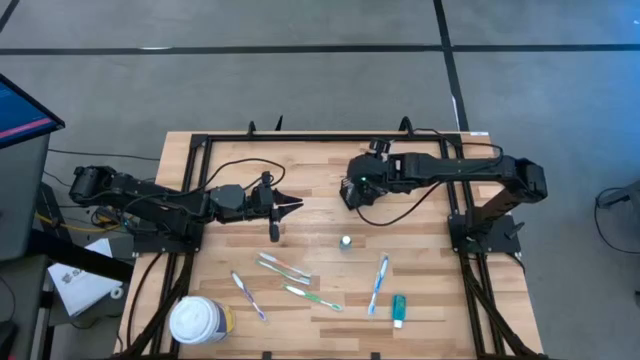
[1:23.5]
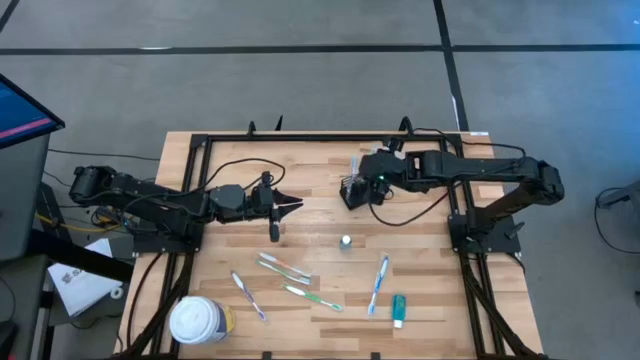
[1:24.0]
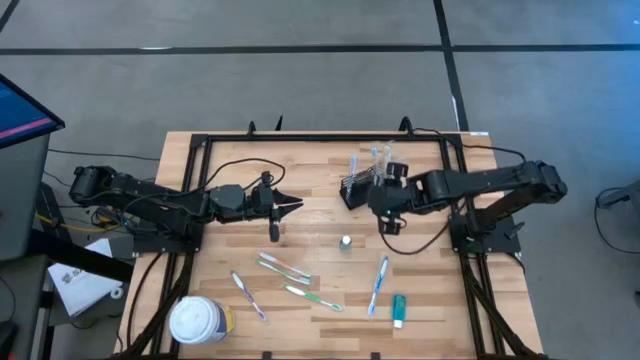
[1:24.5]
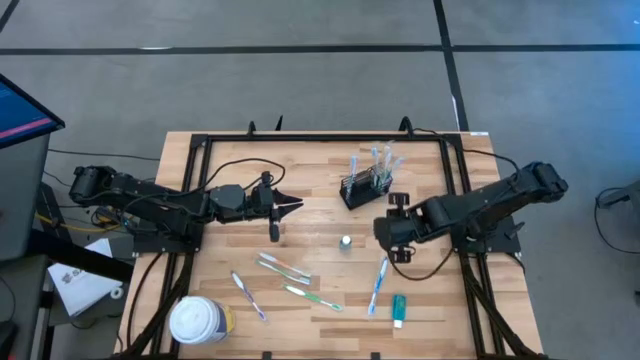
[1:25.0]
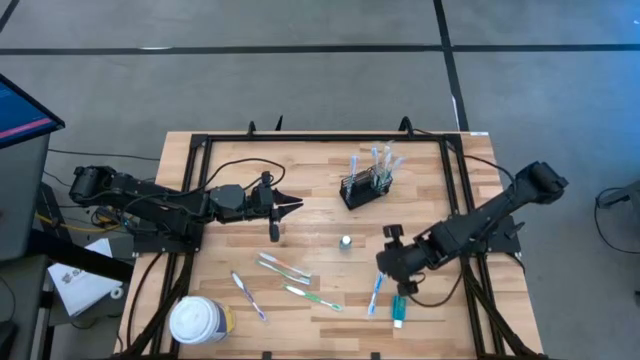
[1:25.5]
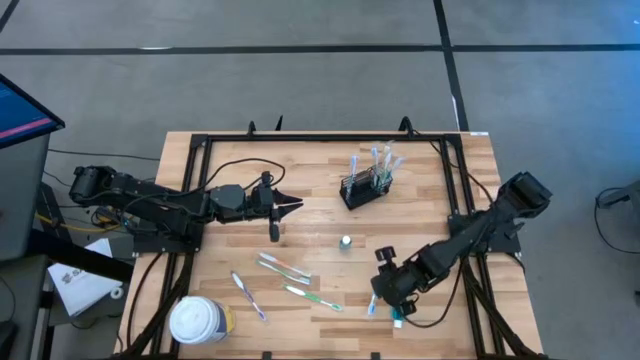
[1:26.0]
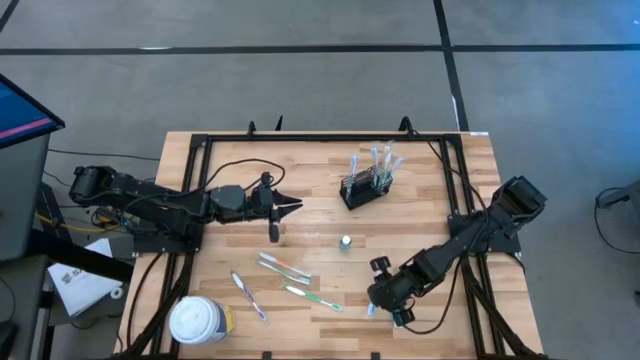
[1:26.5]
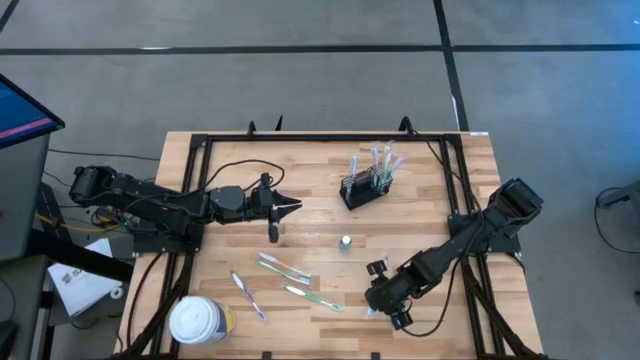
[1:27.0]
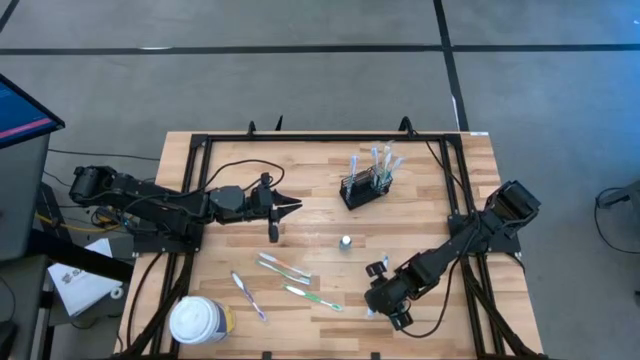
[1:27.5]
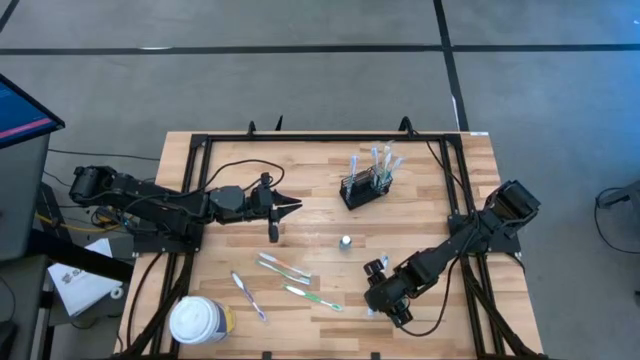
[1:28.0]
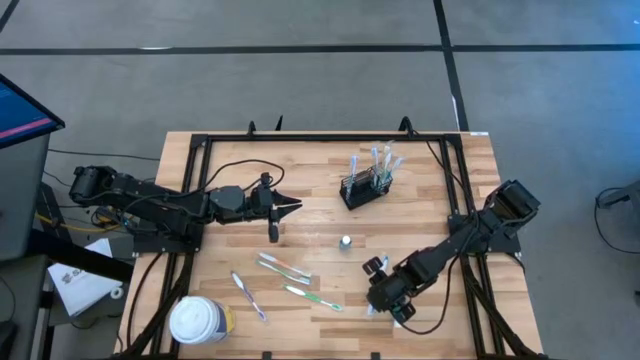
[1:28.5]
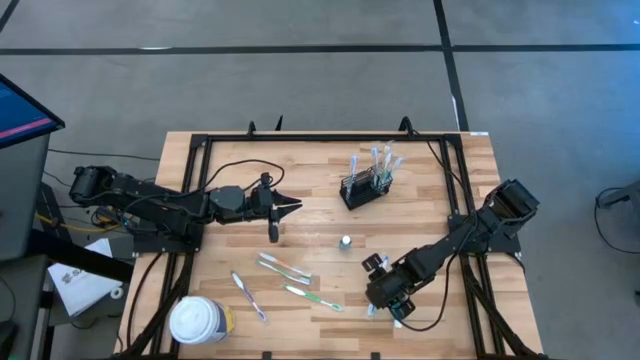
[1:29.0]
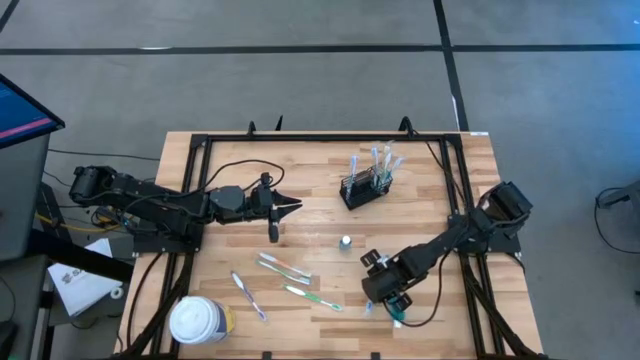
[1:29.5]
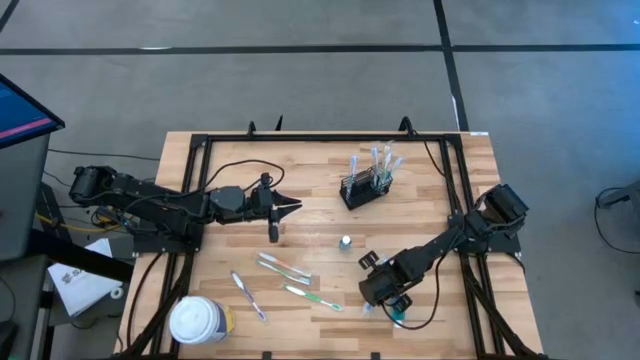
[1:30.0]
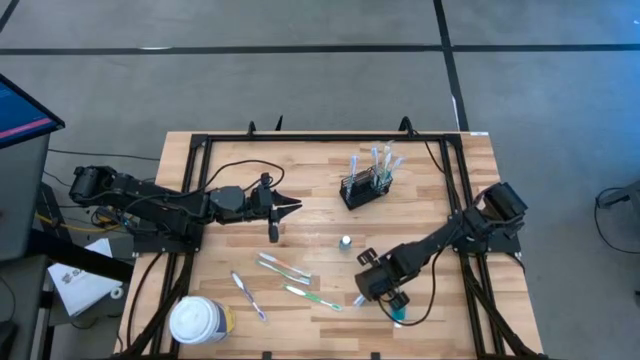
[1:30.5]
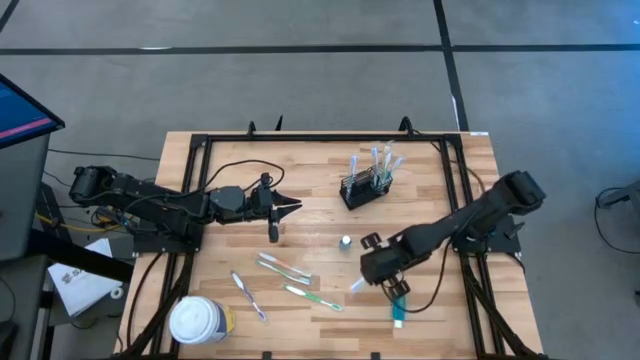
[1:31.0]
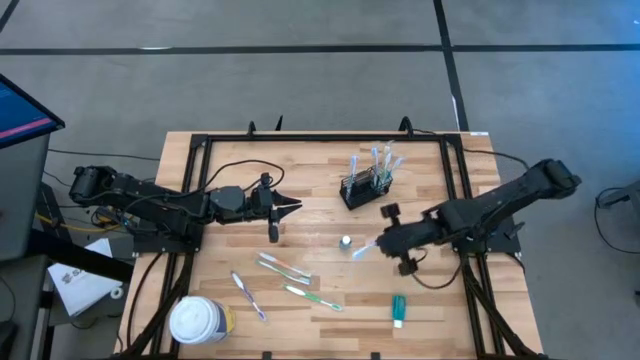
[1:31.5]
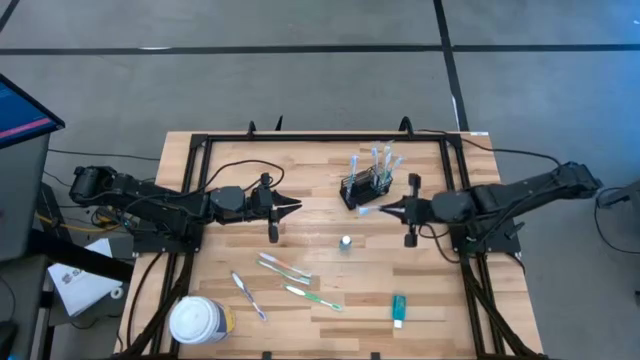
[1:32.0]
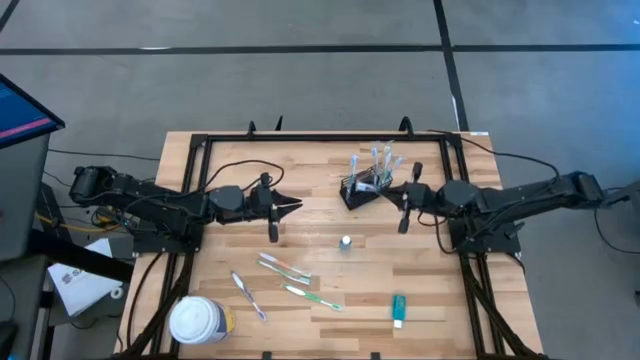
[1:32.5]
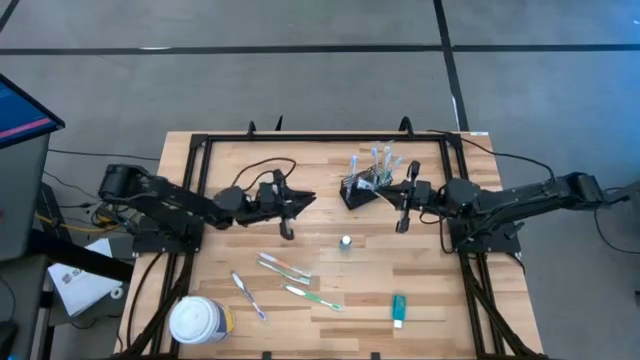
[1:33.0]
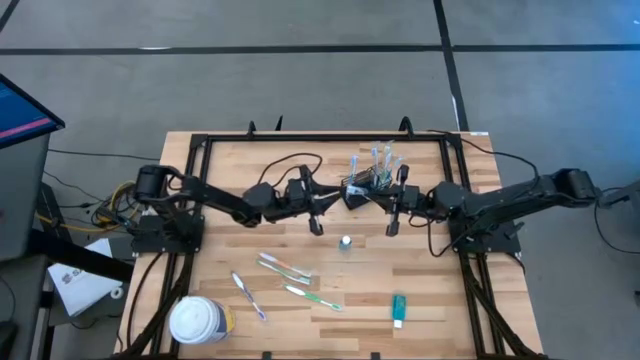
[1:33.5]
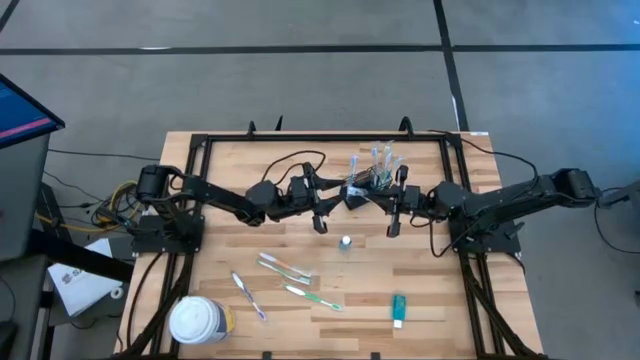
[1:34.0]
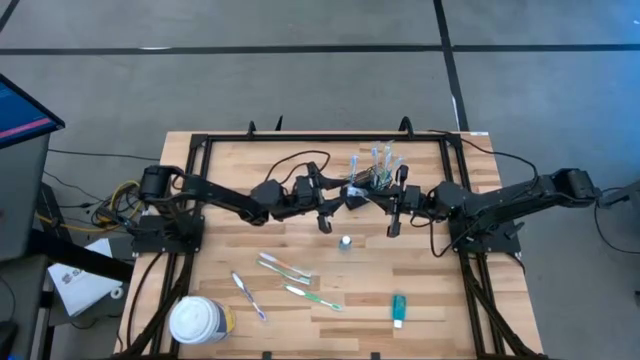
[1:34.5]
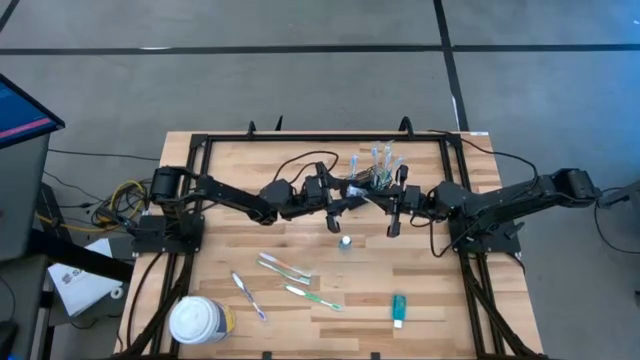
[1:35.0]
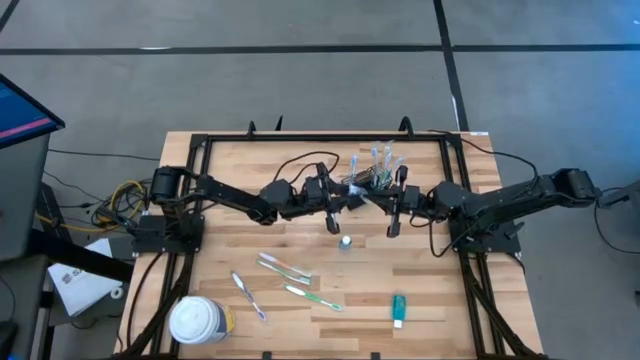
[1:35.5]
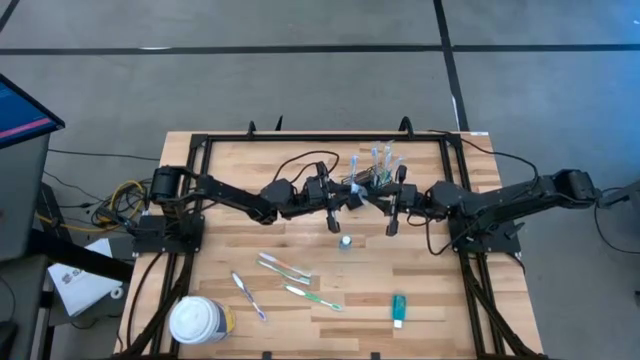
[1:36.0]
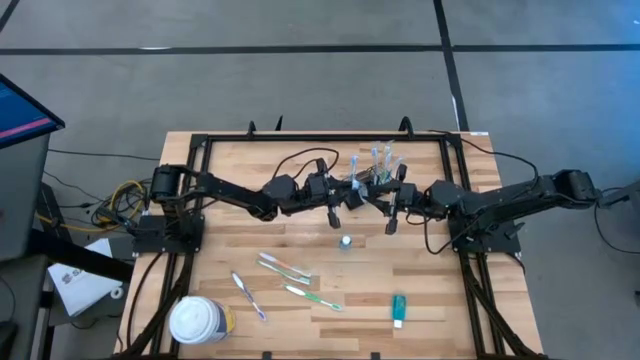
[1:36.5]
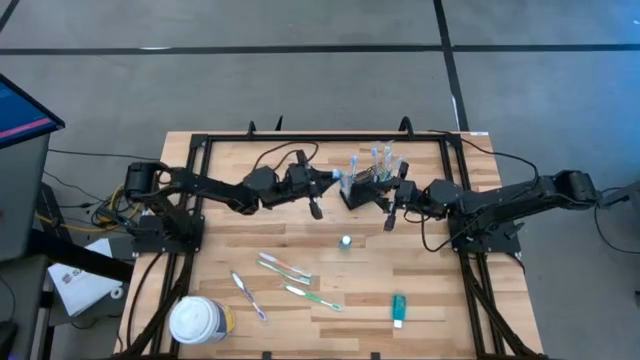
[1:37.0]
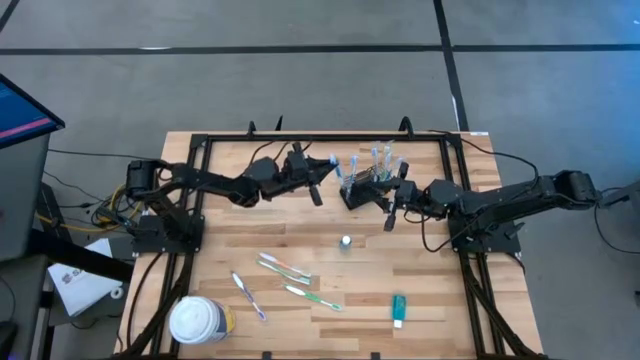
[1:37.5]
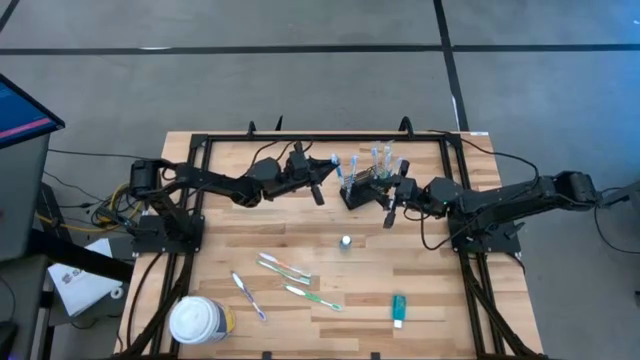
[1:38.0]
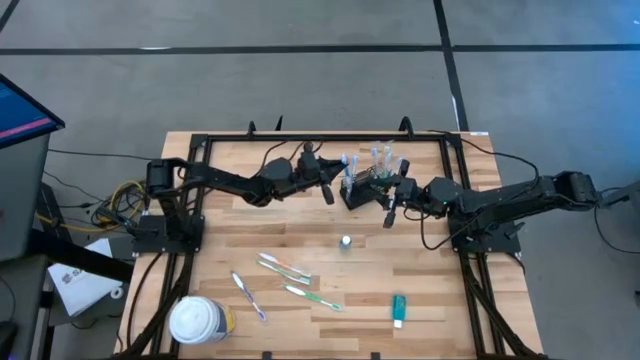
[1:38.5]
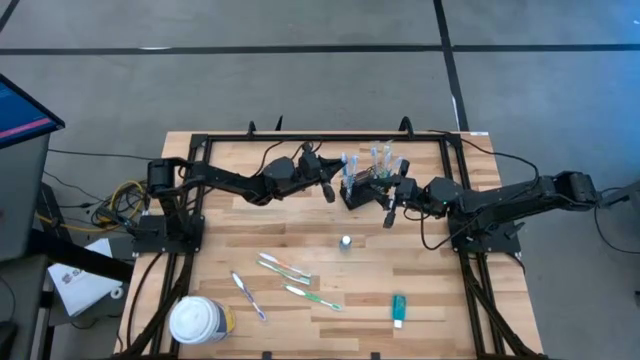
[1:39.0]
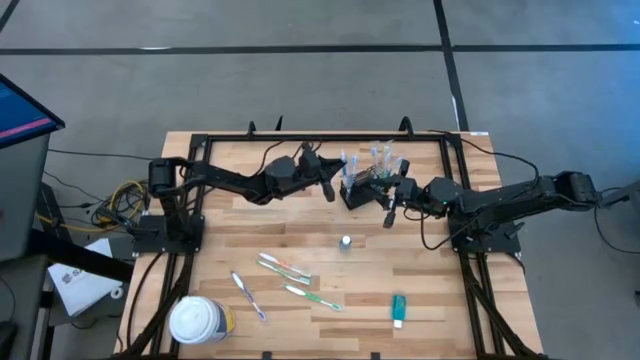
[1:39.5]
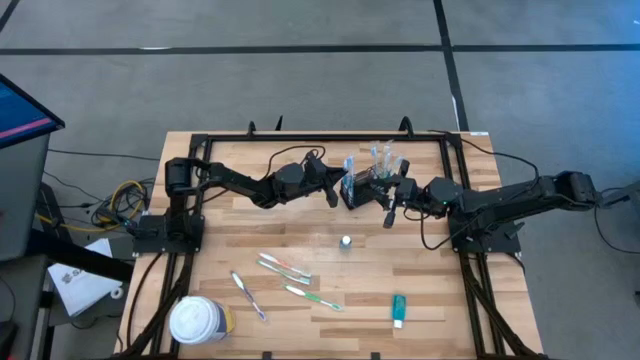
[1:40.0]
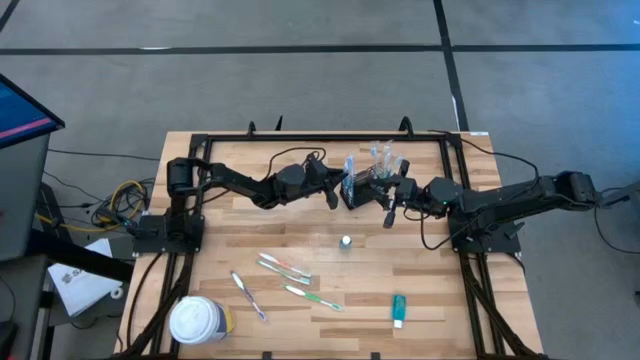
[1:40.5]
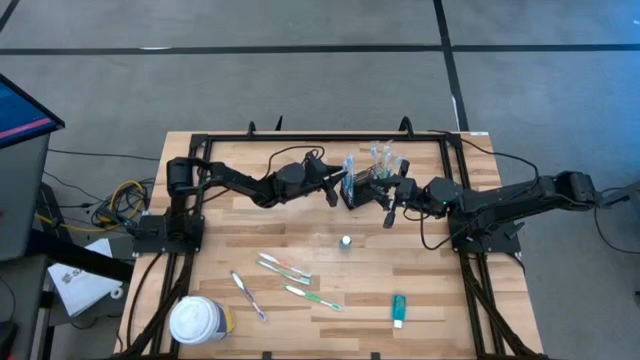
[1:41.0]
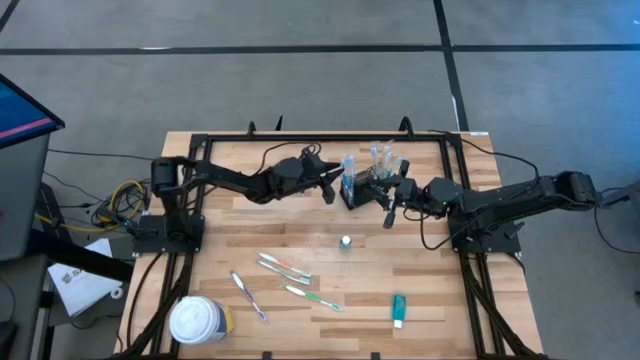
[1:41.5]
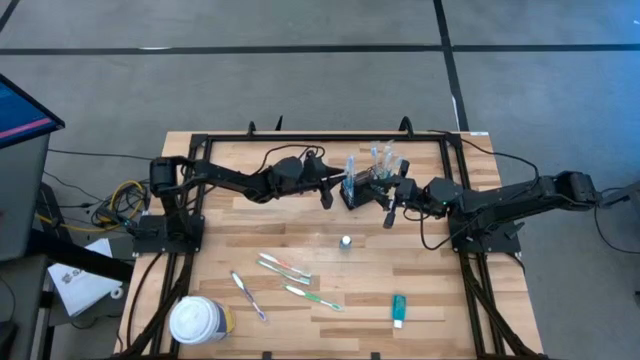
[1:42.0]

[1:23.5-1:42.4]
Task: Pick & Place toothbrushing station
Put the blue toothbrush into the mesh organizer

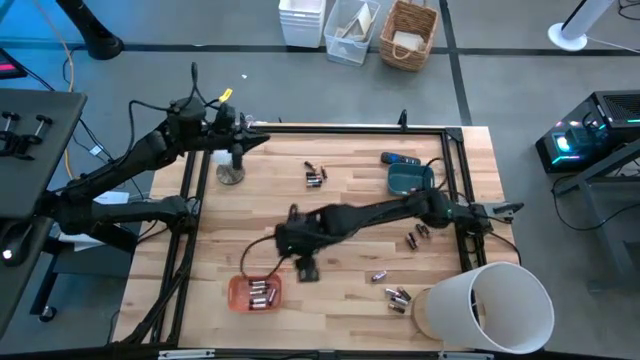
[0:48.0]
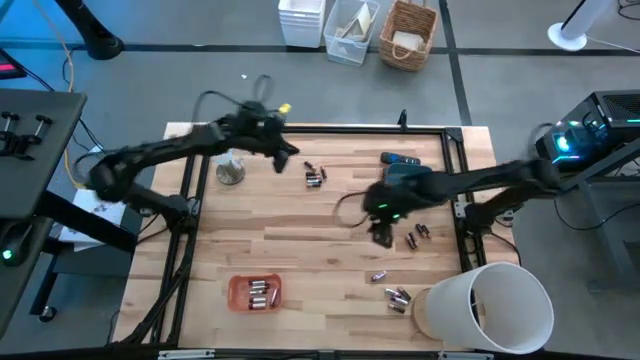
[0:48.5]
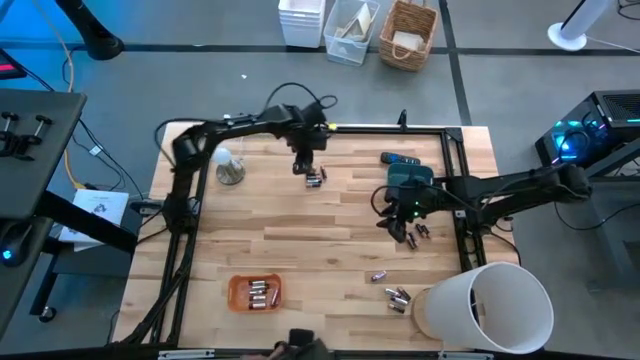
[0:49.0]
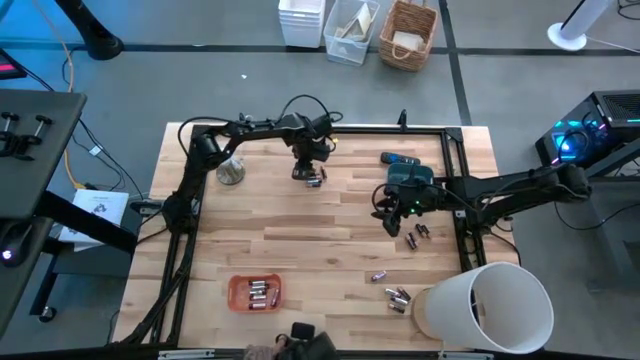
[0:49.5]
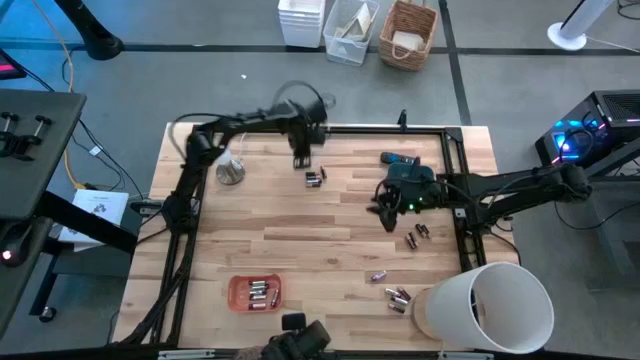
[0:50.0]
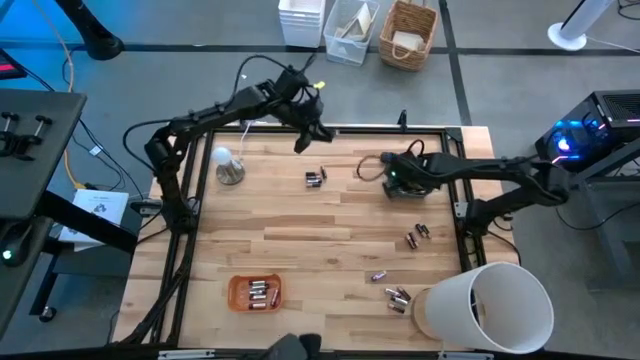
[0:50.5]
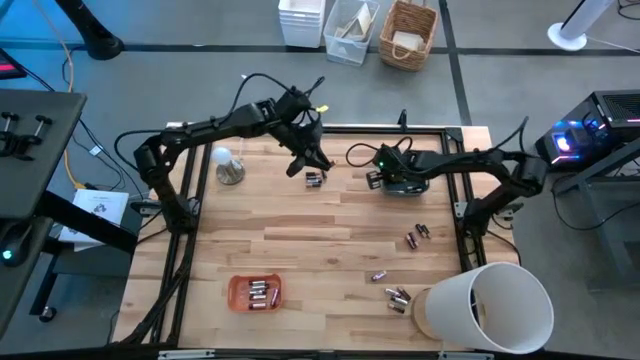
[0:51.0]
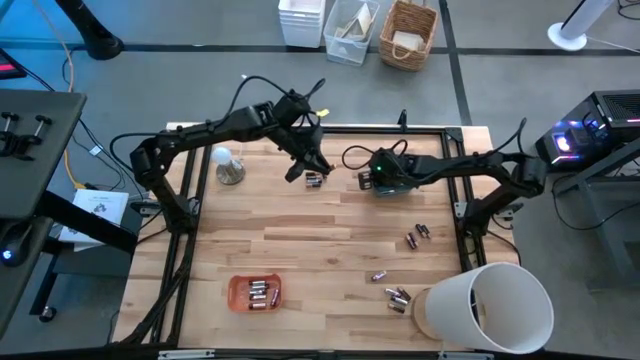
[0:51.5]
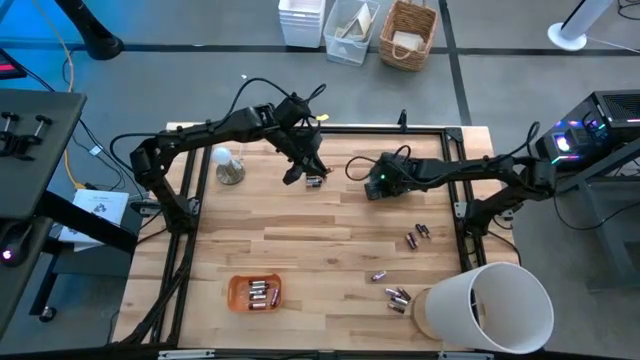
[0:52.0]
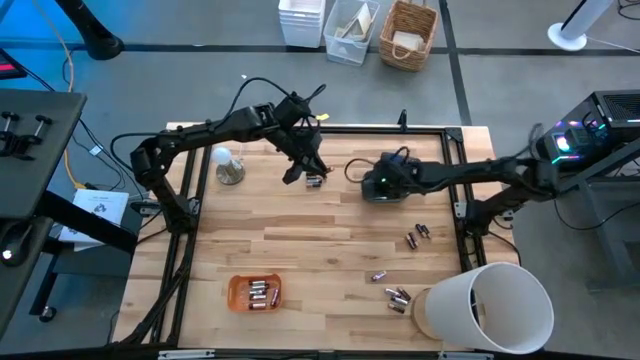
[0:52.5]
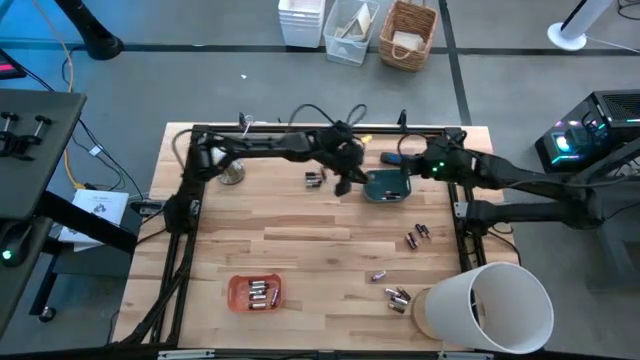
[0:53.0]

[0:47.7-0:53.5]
Task: Sort batteries
Put the black battery into the blue bin
